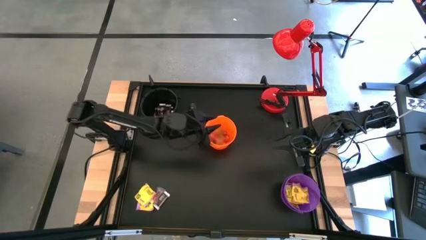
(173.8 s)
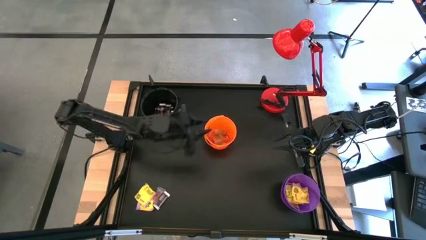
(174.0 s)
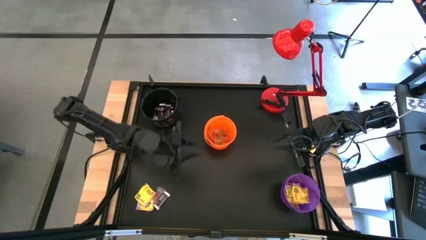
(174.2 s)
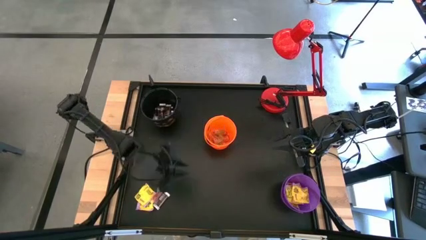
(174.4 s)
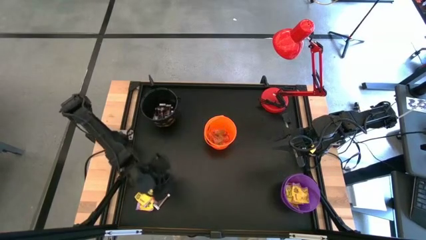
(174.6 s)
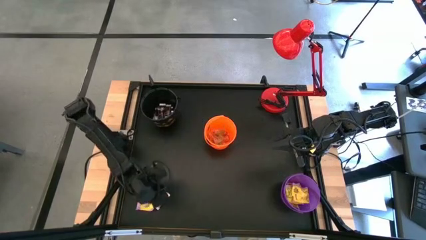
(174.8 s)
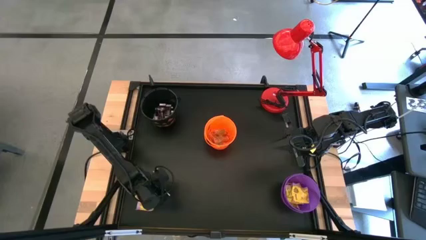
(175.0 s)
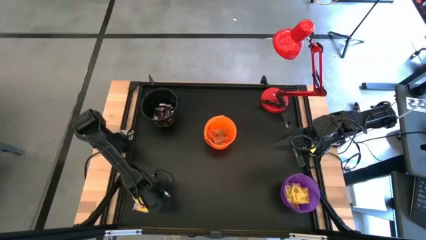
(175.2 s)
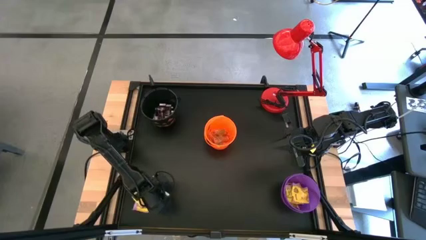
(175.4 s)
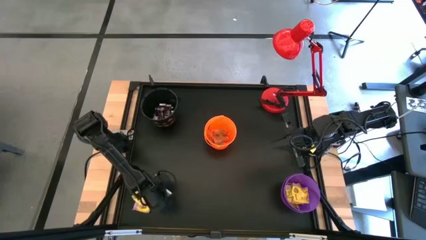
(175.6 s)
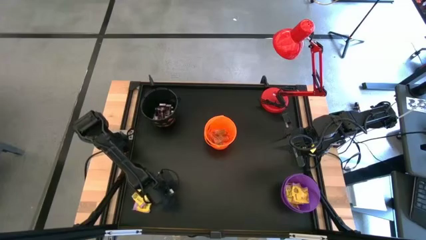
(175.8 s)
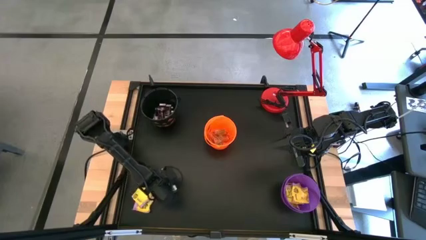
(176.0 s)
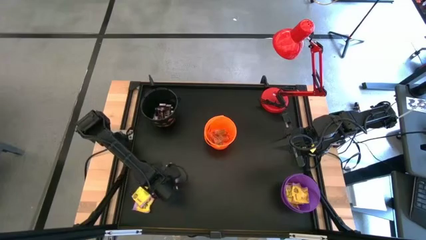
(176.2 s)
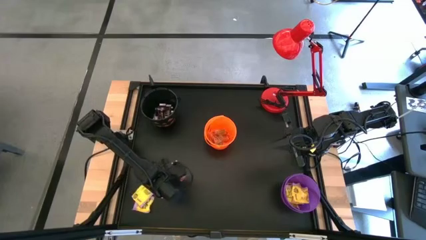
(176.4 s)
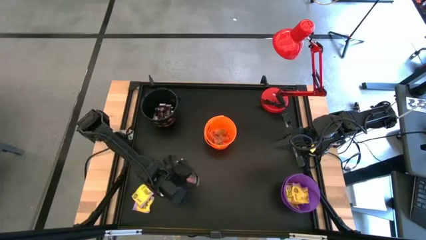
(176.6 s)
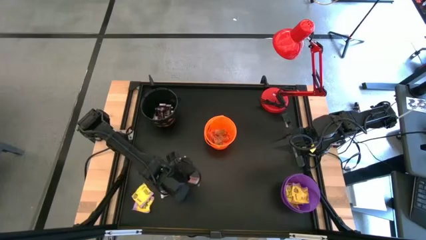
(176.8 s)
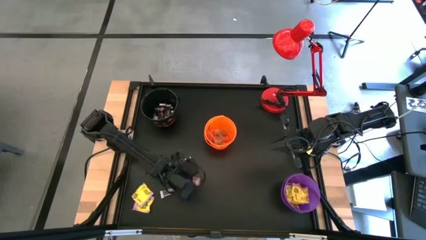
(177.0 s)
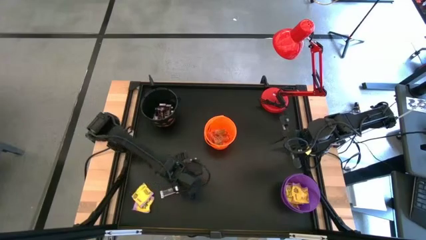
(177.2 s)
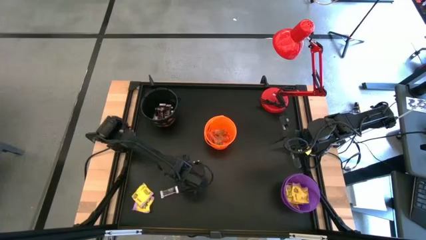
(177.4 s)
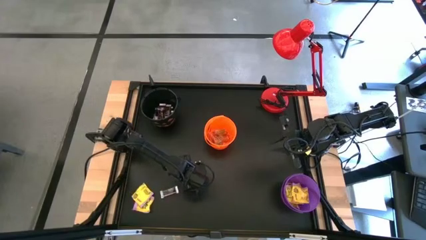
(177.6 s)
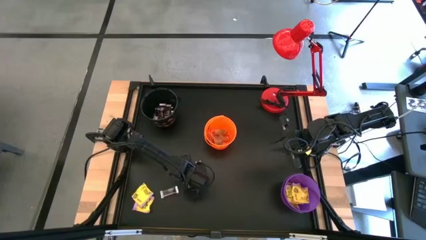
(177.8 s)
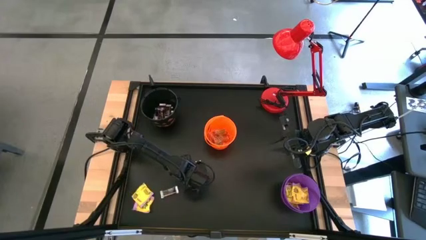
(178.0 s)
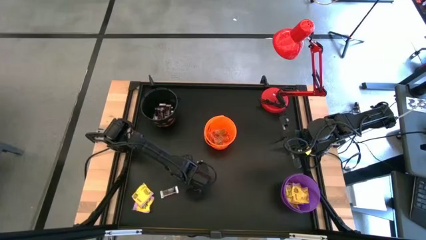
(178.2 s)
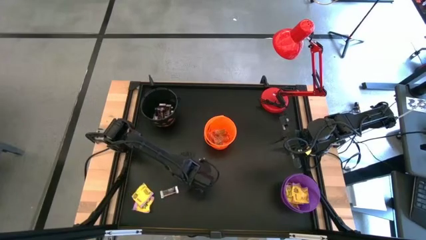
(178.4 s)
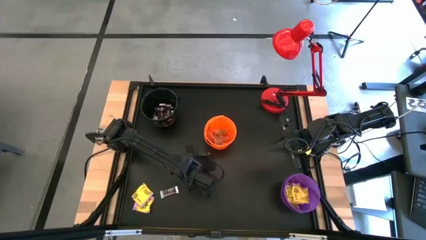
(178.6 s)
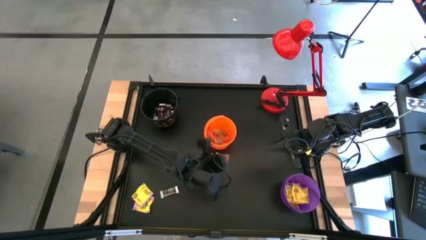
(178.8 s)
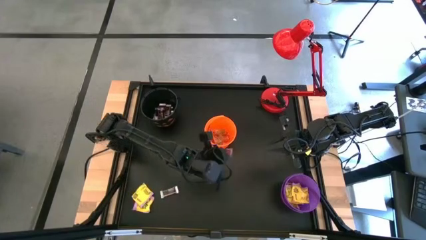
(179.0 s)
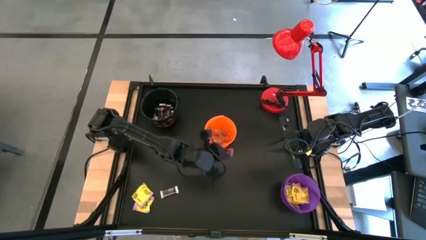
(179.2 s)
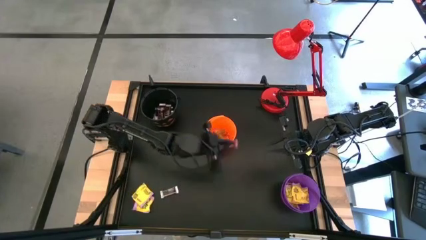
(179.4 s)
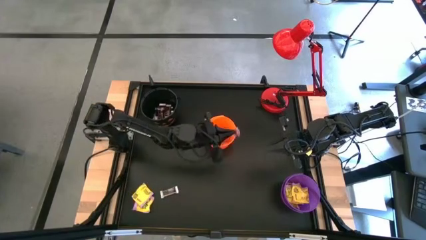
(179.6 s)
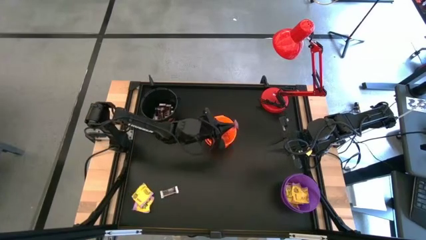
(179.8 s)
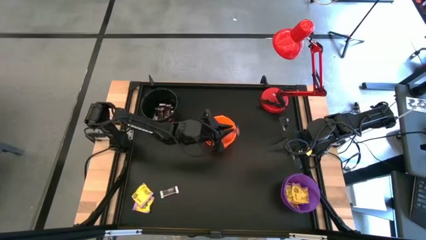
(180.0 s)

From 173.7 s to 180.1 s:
Task: Sort candy
Put the red gummy into the orange bucket

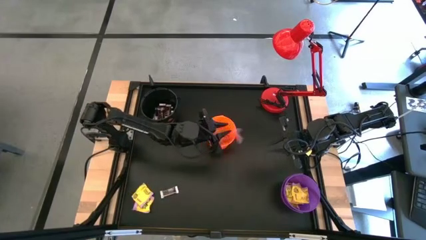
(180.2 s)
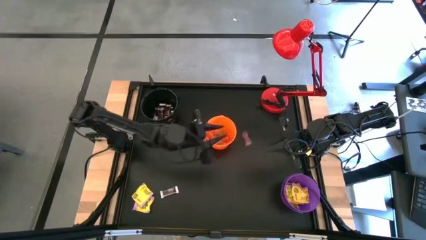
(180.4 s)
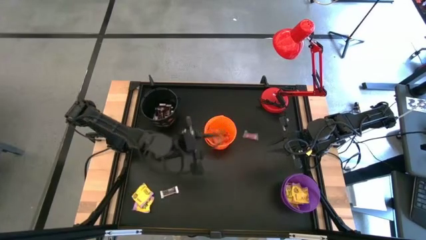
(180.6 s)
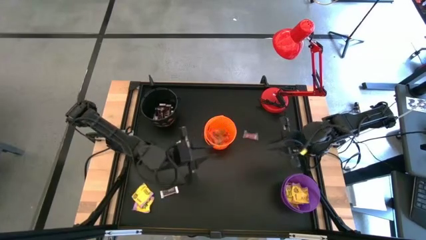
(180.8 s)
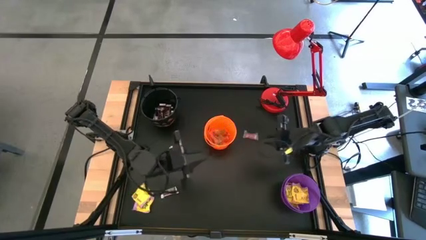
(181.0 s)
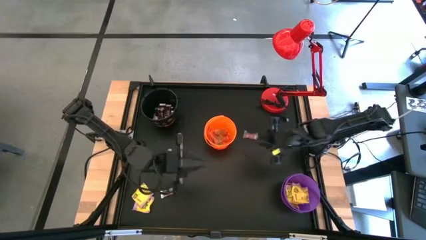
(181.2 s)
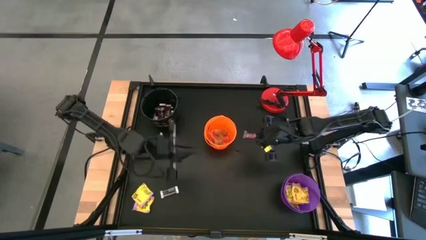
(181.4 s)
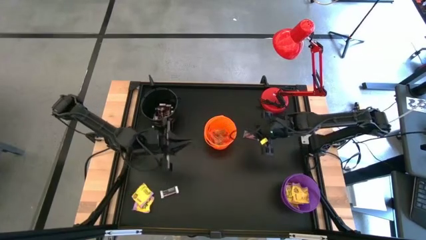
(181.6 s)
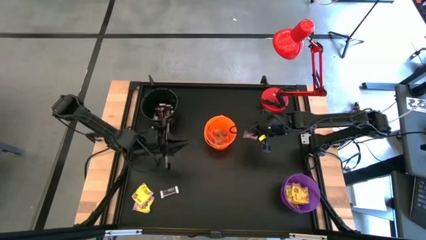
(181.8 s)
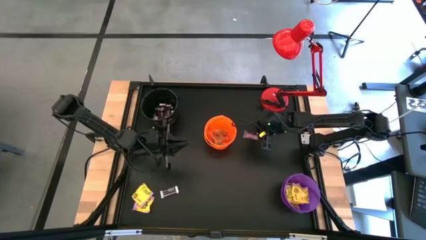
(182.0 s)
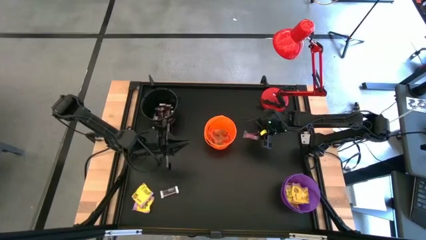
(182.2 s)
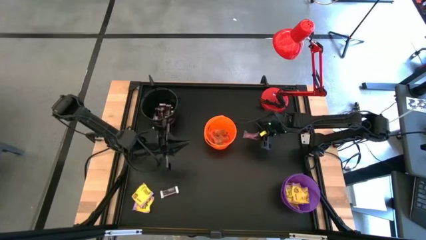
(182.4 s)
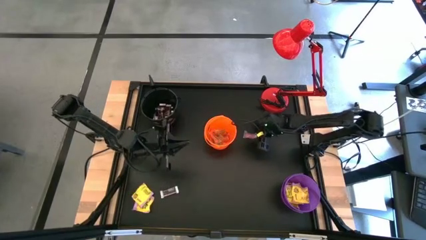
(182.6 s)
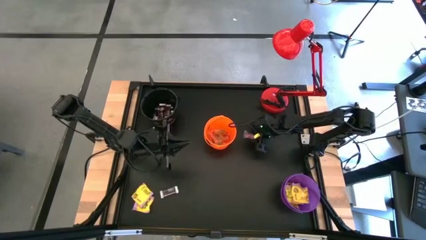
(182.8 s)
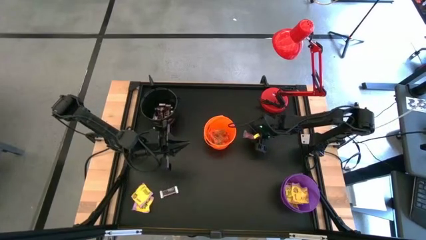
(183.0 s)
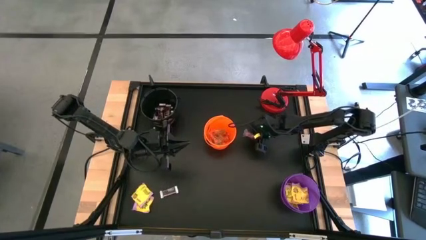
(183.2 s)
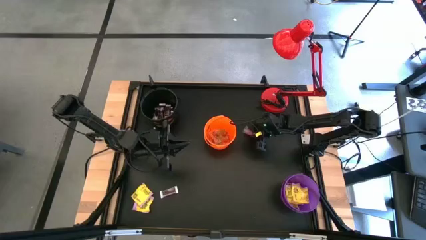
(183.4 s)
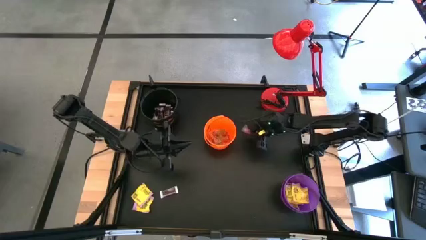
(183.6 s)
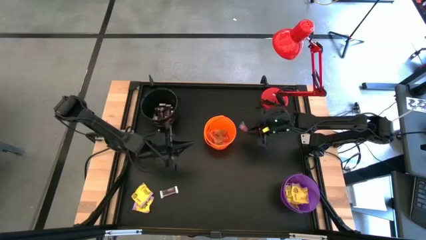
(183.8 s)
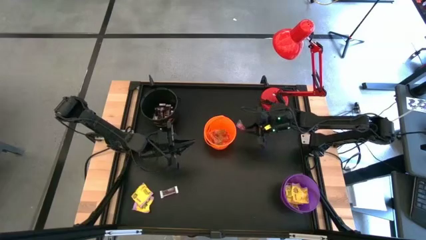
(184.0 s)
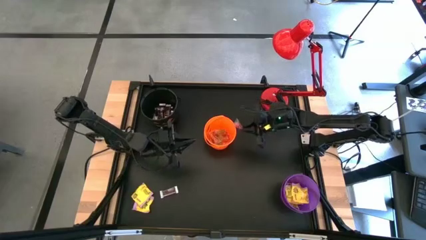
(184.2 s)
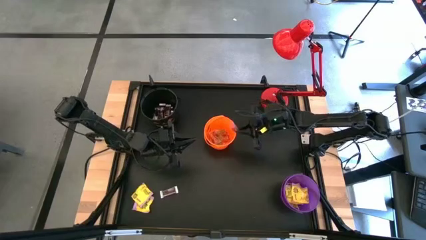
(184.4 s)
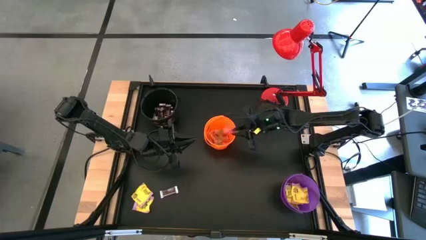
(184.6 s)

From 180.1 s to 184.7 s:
Put the red gummy into the orange bucket

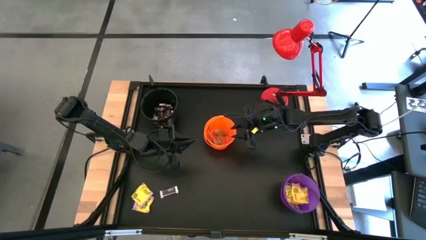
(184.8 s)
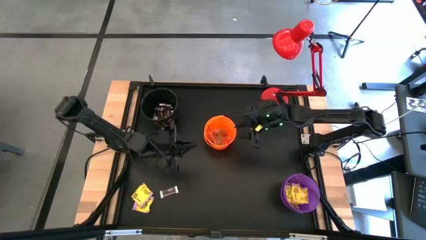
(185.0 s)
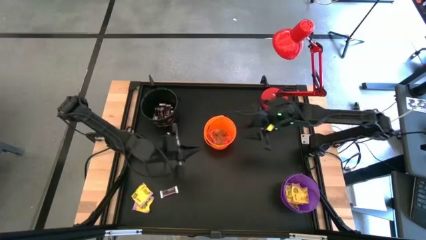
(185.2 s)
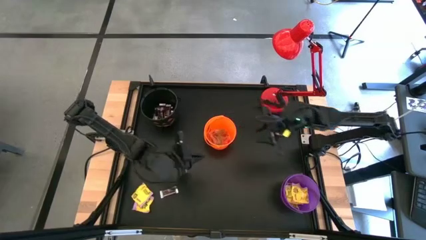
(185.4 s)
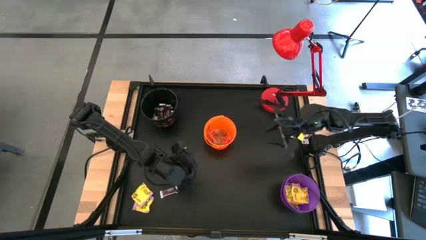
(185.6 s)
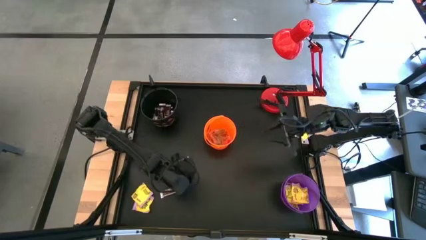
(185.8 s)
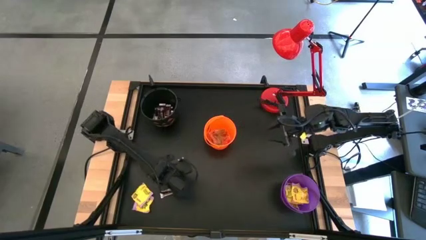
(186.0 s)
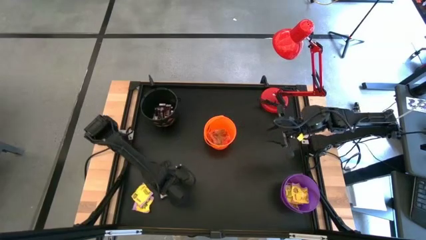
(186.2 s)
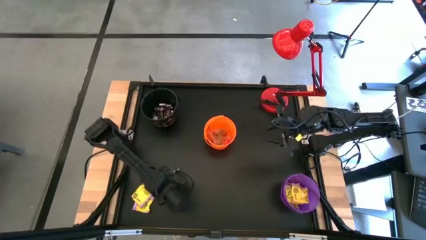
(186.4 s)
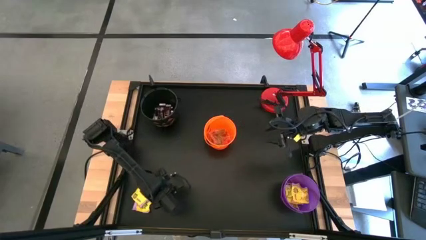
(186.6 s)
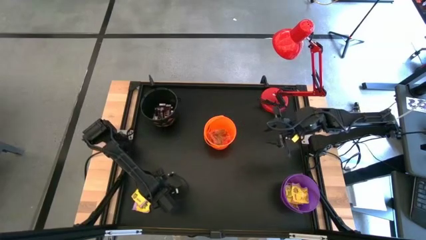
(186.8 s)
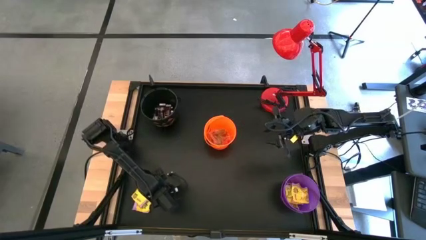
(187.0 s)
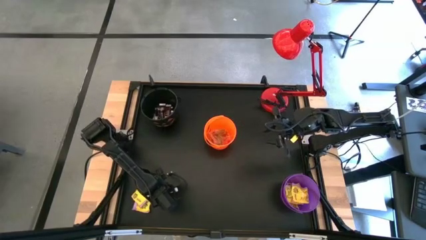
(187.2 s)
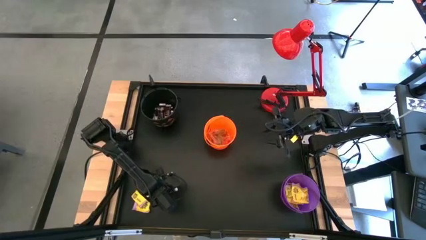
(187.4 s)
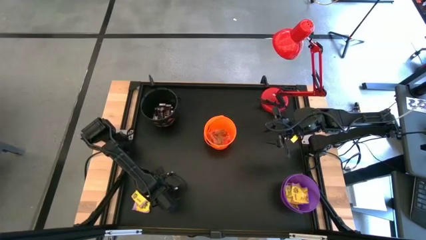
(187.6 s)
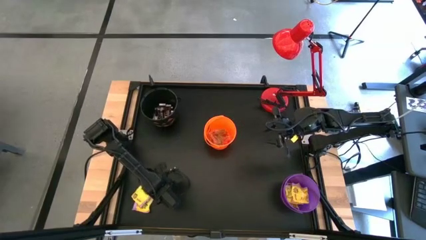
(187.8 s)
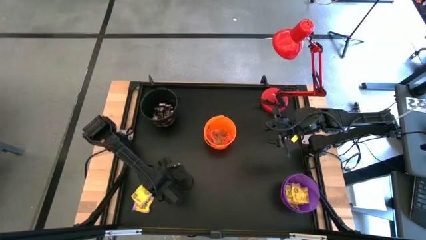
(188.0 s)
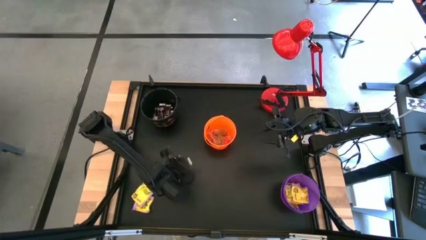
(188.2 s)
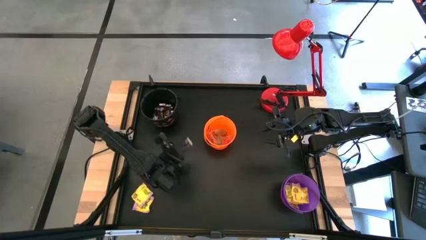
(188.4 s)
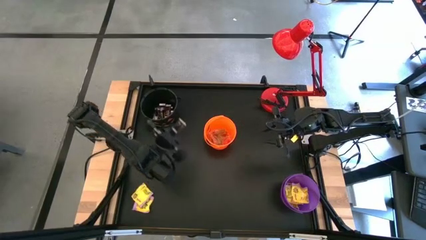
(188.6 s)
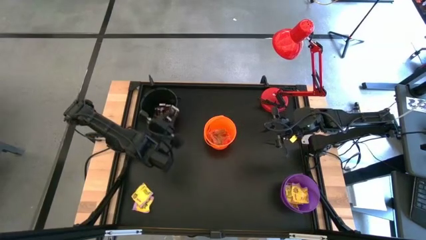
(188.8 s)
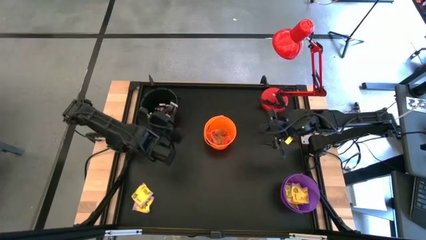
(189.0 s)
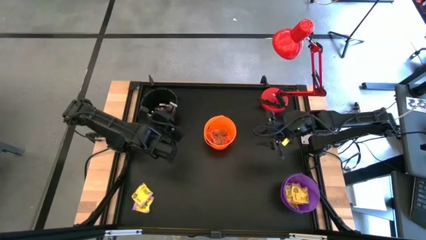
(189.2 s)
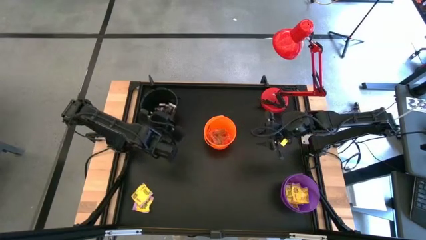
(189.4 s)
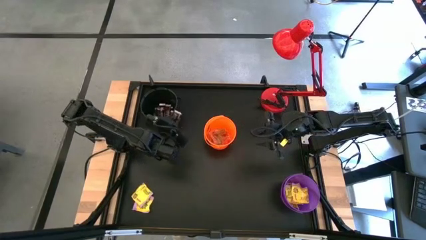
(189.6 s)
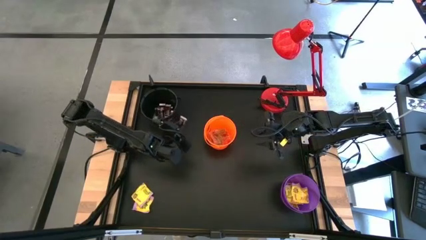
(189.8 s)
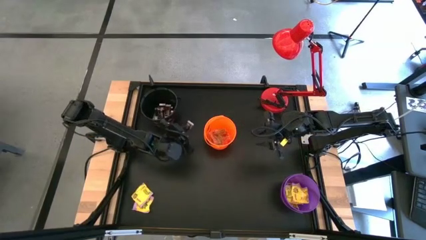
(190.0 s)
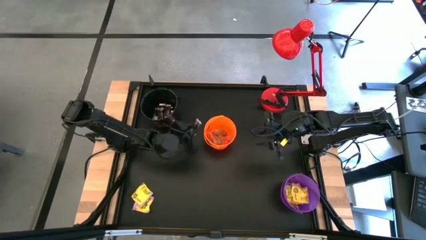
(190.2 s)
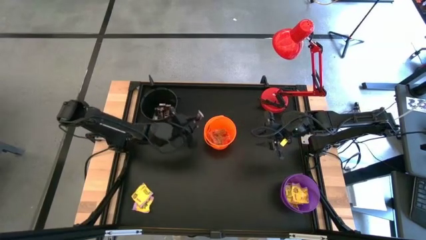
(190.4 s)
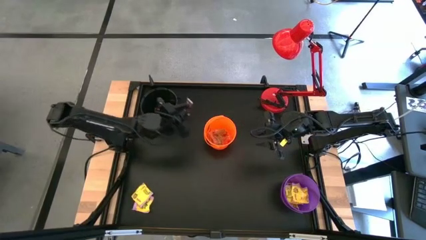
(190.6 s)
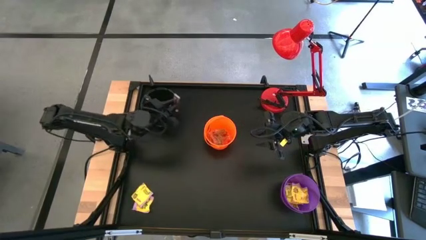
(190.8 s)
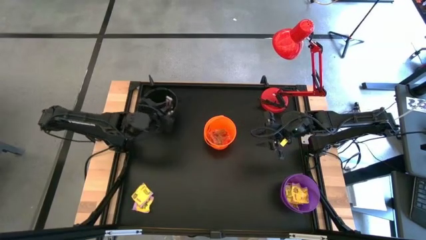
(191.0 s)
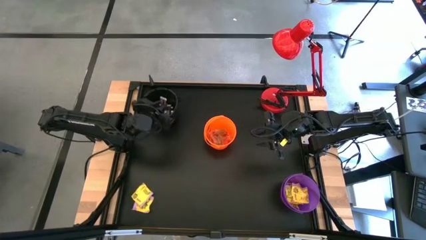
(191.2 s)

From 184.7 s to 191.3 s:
Put the brown chocolate bar into the black bucket
